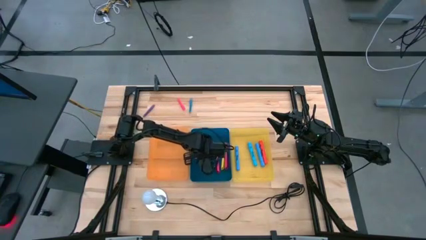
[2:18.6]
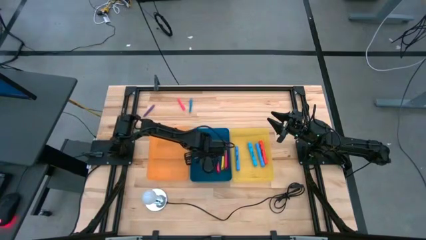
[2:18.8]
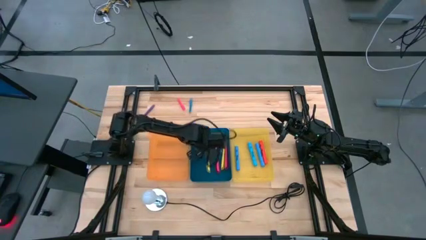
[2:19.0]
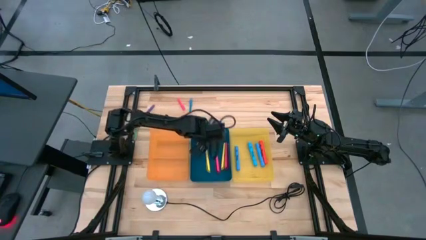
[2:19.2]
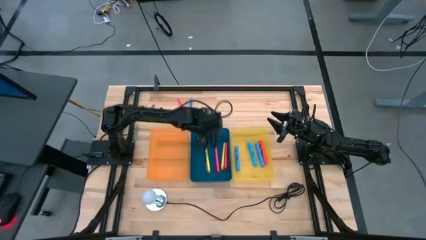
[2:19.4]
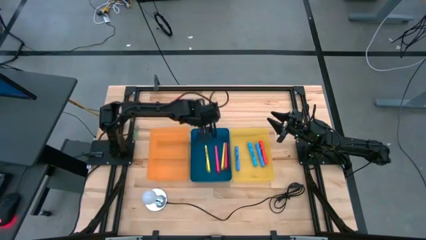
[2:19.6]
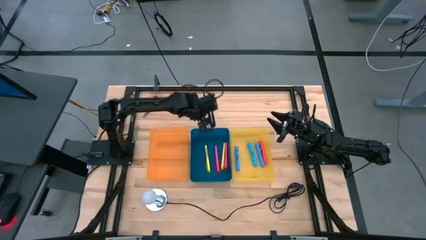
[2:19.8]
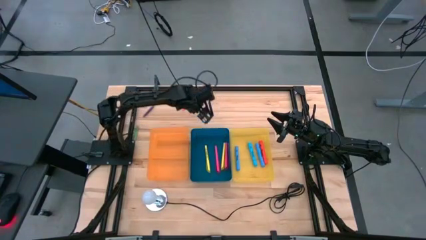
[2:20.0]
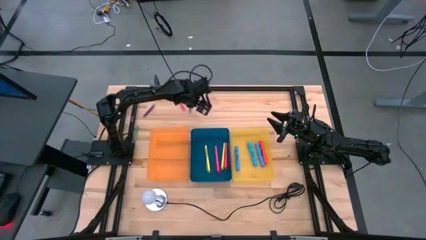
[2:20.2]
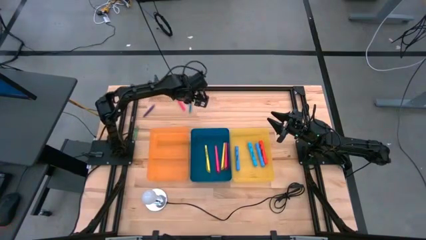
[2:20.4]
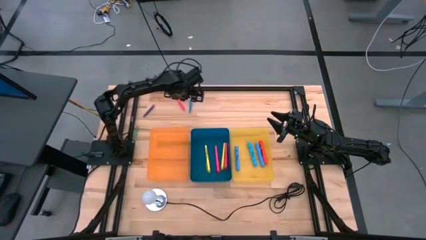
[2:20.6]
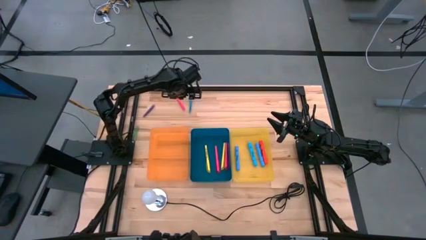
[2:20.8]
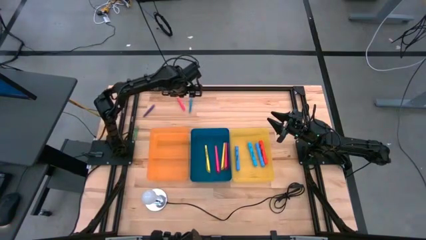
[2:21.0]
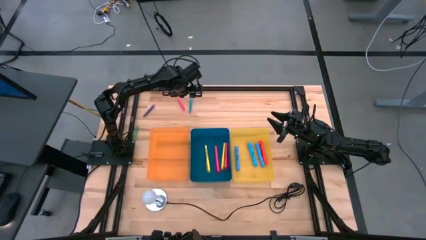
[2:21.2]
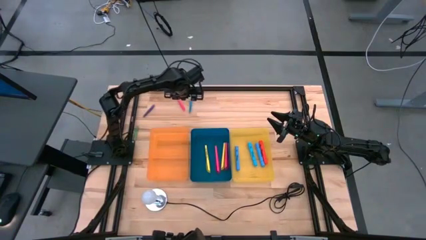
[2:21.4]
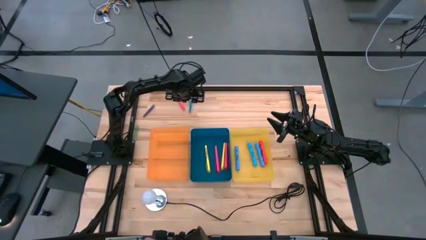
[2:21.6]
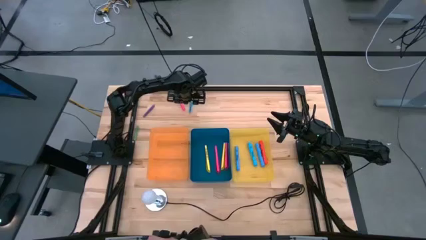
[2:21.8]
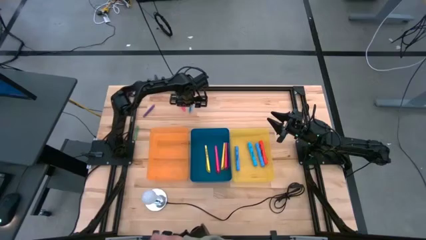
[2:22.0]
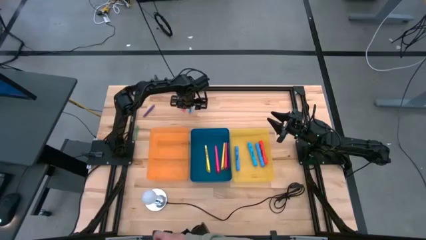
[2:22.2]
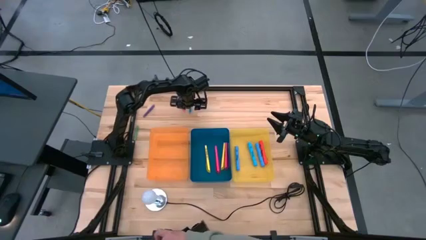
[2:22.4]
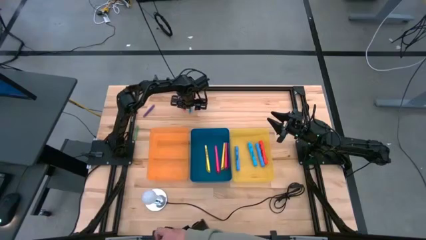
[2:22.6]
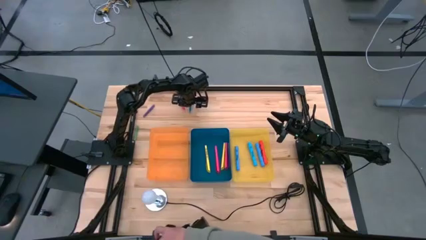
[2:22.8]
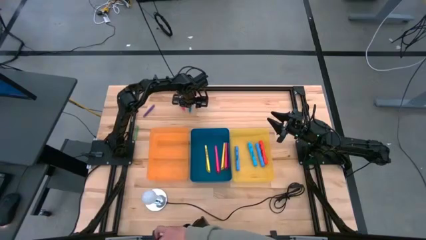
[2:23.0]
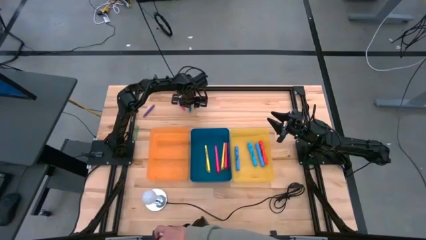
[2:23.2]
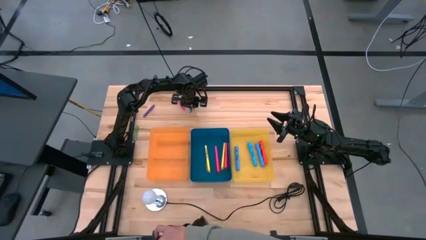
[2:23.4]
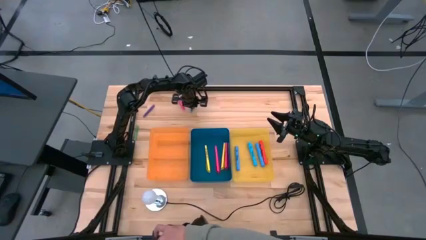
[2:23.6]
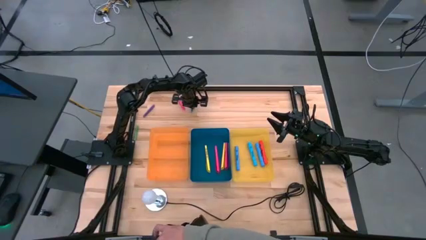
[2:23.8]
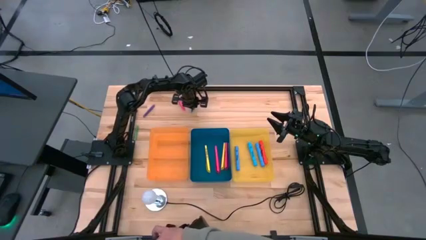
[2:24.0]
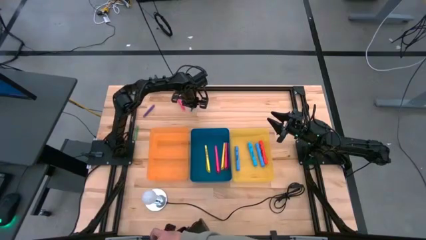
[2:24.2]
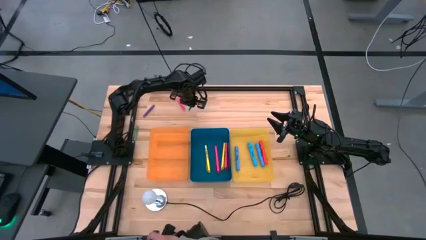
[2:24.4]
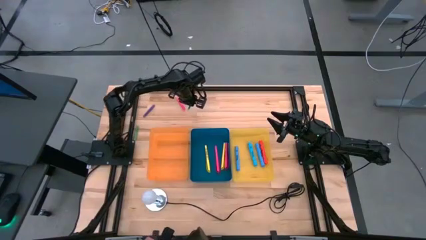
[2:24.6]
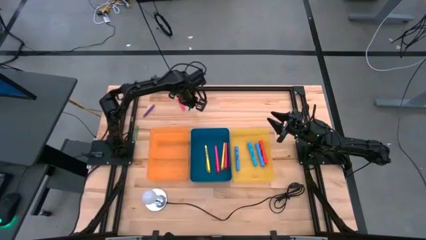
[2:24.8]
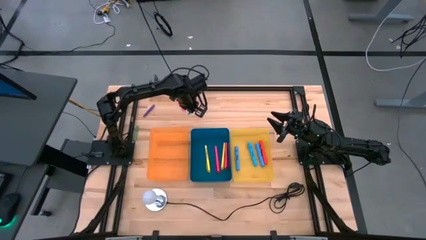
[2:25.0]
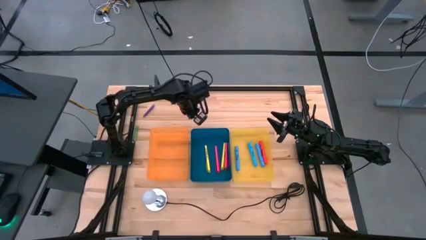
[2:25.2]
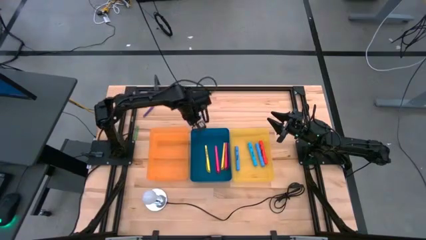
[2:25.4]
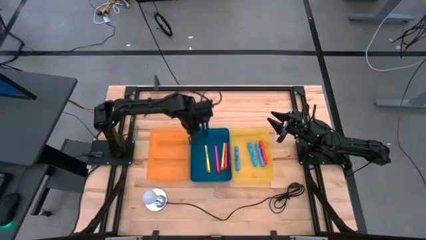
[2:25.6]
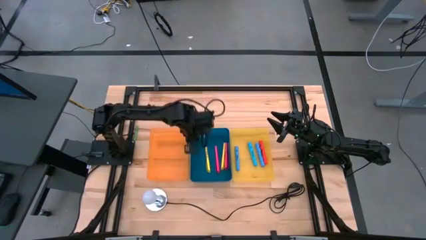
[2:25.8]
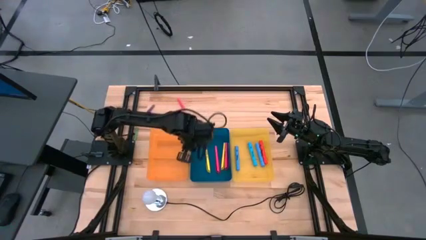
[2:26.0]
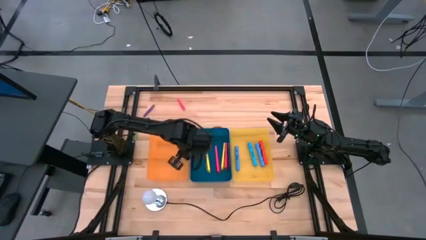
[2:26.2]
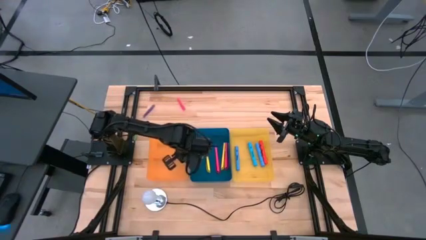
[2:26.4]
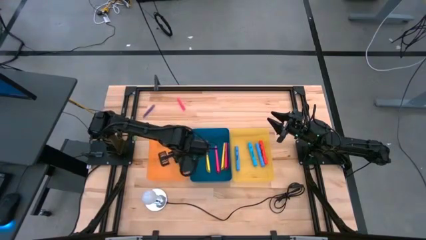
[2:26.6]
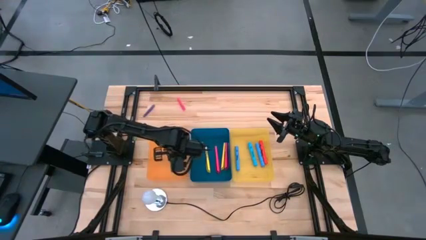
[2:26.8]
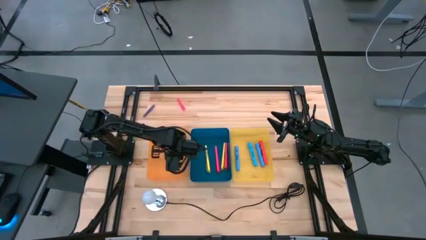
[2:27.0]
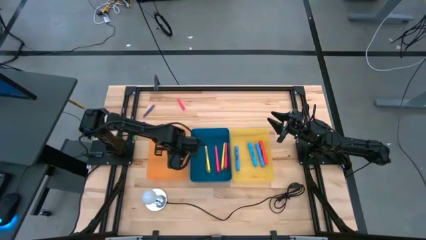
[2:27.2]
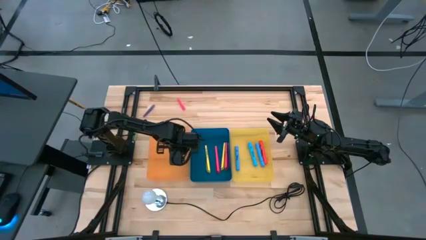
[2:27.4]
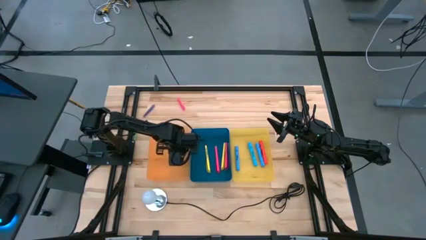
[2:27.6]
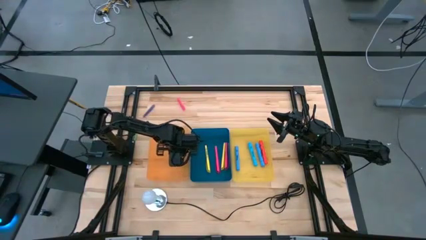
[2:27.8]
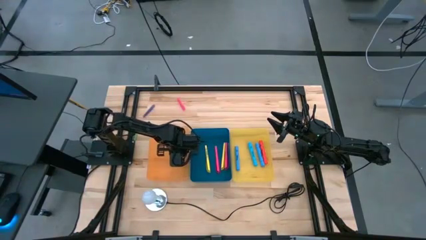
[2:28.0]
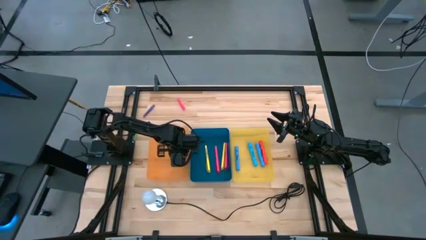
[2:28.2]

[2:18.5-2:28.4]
Task: Pick & Place Markers
Put the small blue pen into the orange bin

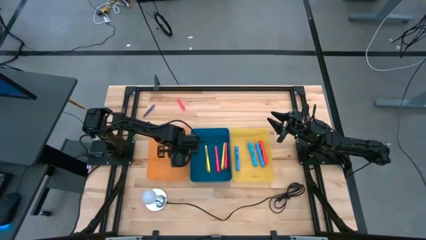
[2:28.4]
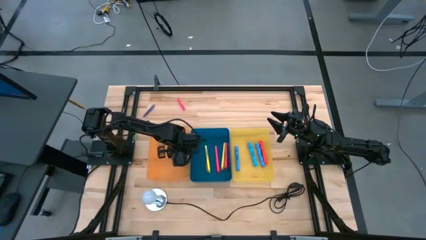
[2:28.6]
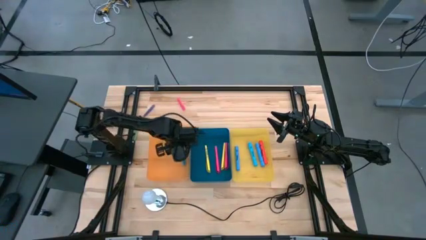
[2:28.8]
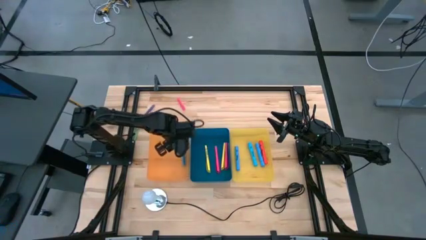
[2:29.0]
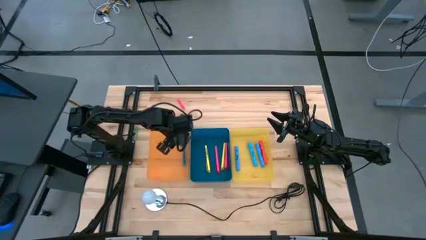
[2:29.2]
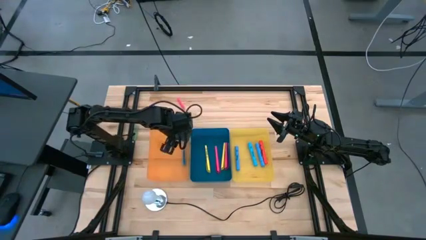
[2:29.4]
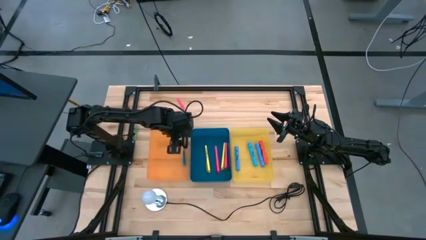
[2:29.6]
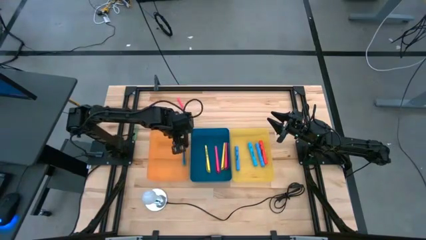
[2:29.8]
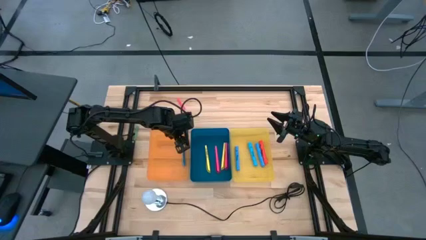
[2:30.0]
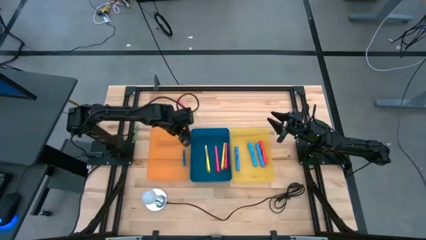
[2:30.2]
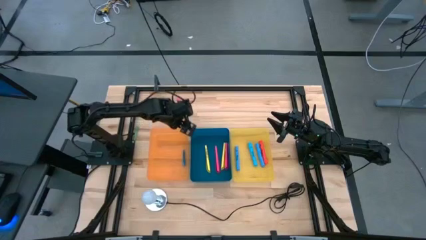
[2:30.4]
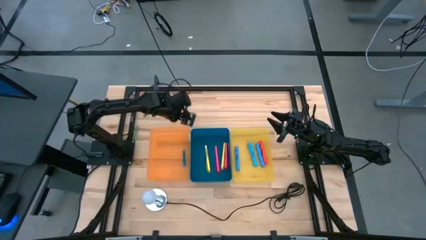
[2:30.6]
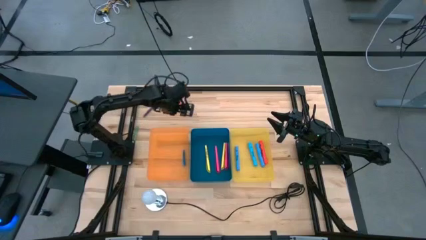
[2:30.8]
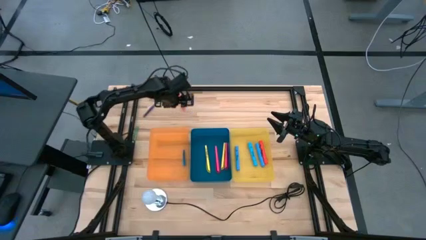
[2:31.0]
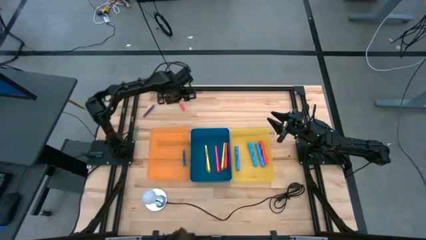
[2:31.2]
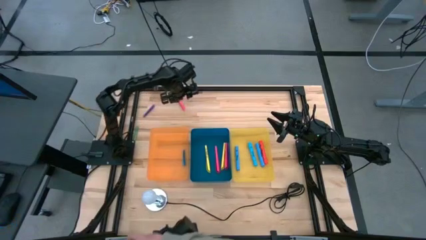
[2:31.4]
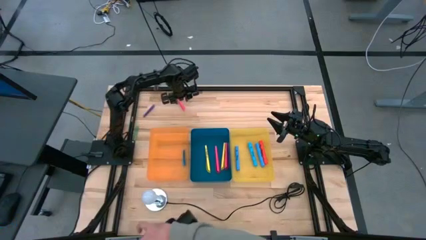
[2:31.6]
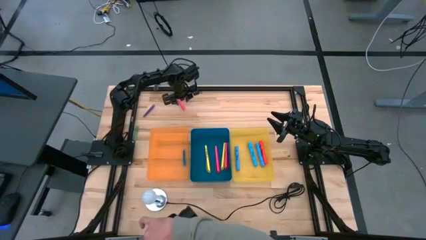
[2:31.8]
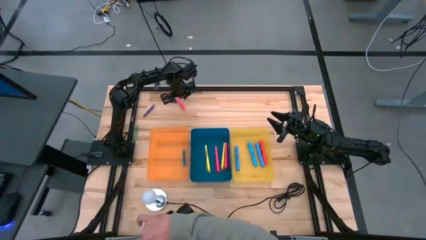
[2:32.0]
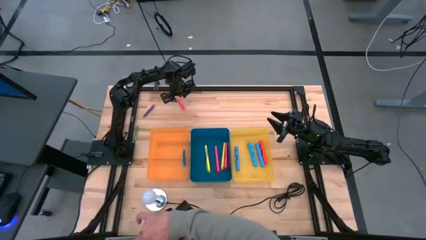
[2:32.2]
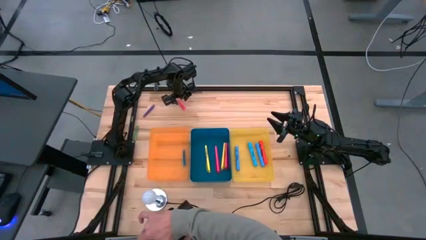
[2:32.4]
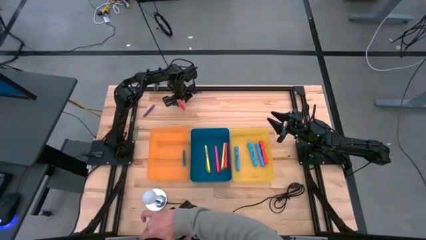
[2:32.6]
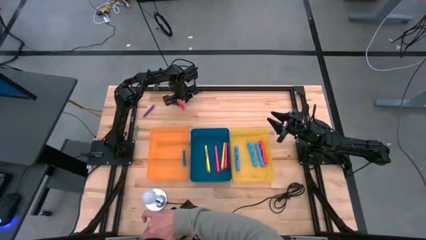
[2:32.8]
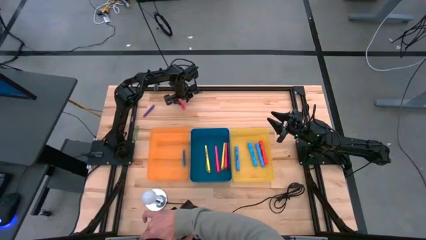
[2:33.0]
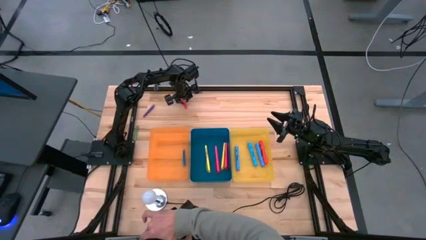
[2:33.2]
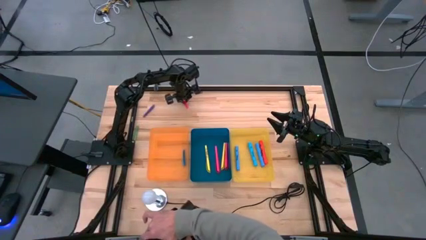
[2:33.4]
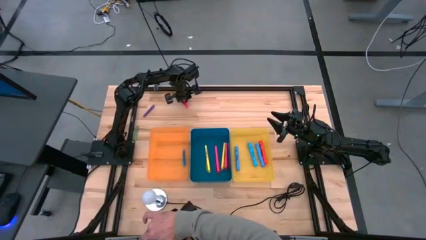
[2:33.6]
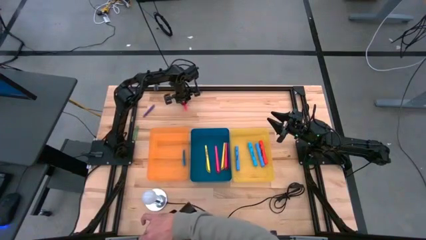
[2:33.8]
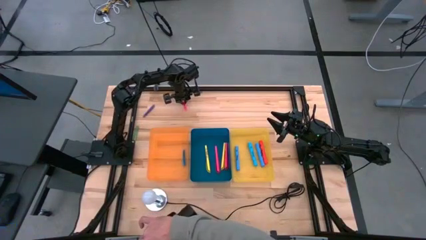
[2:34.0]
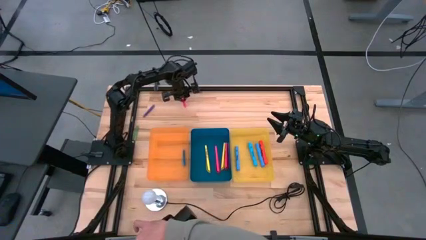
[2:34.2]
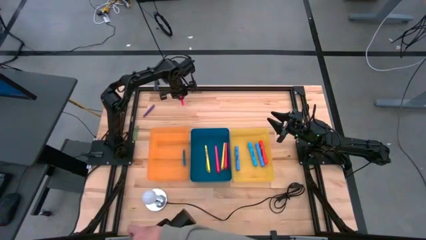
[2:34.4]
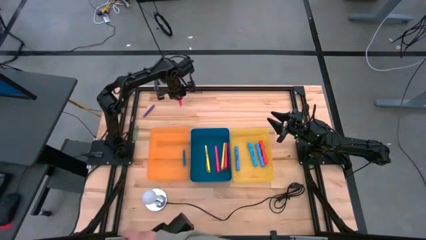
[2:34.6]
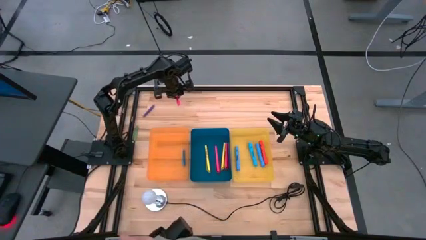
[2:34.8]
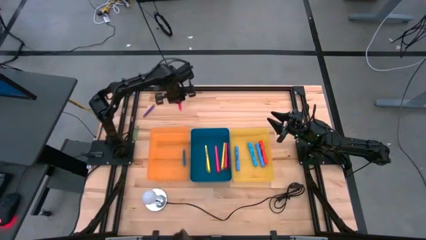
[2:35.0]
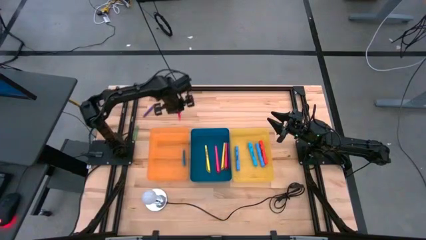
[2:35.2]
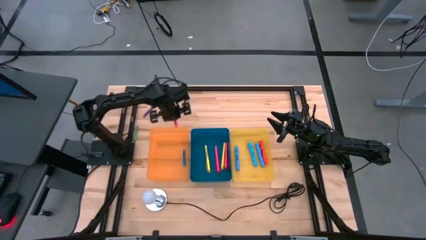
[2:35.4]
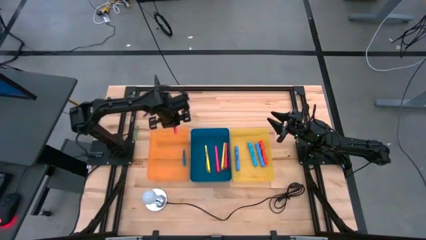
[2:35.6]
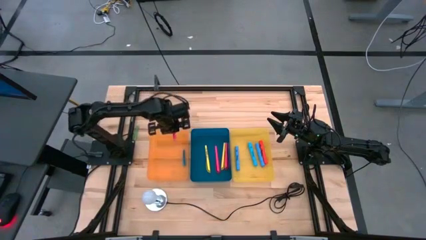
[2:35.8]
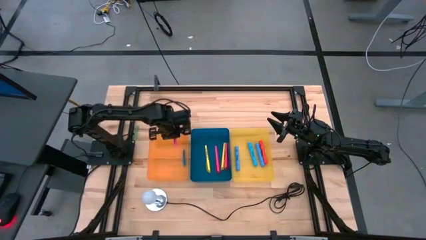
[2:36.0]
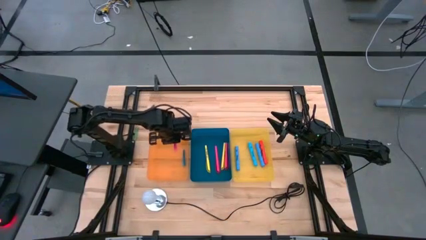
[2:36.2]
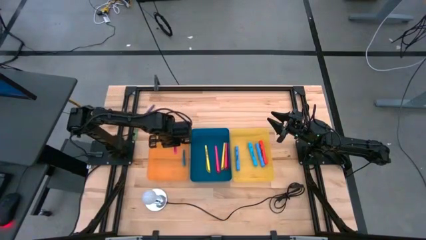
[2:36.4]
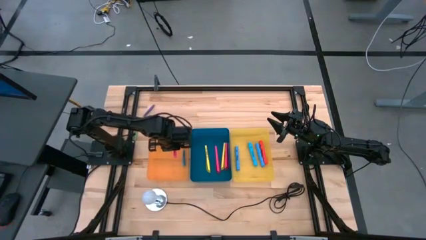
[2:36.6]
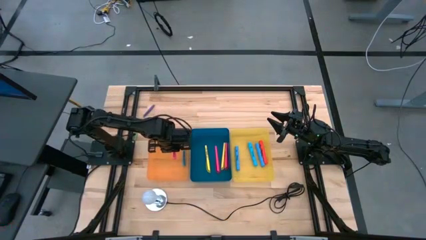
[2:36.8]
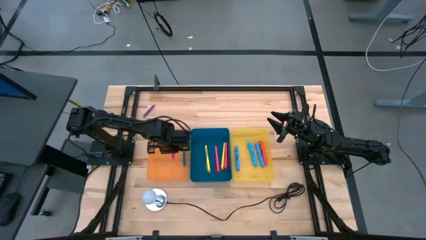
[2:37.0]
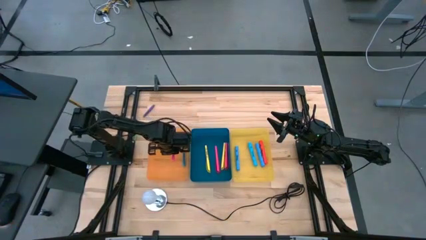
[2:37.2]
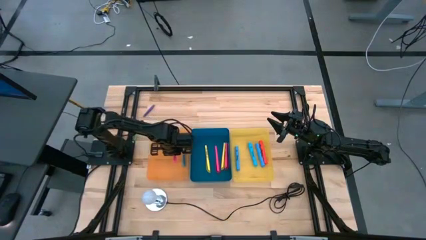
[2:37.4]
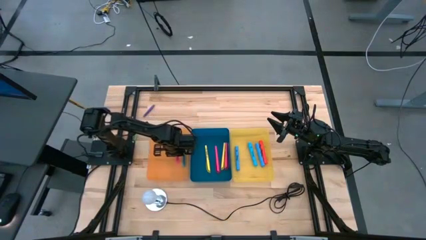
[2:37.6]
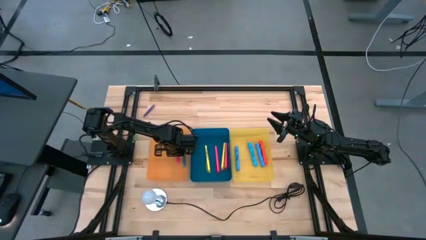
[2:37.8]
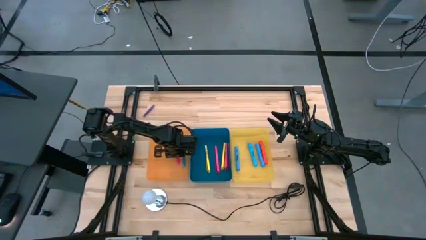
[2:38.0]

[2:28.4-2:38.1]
Put the small pink pen into the orange bin
